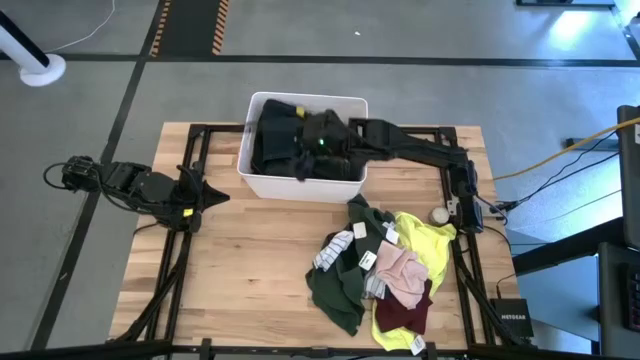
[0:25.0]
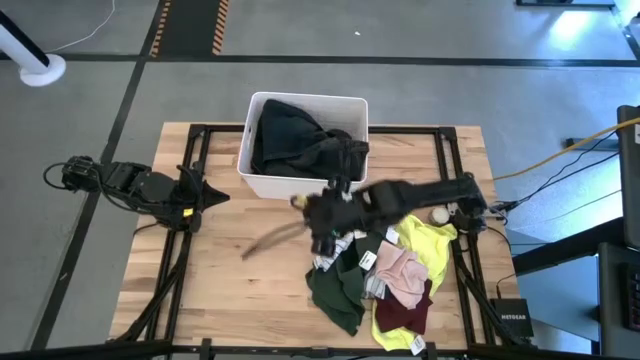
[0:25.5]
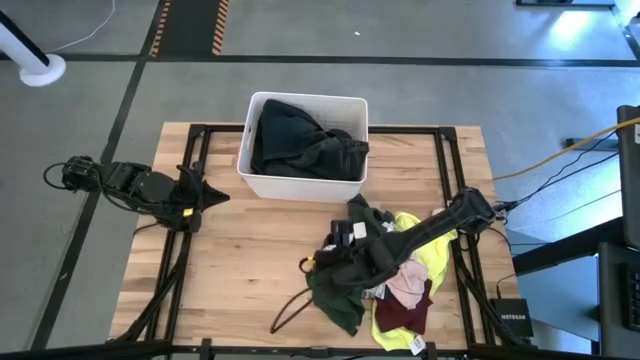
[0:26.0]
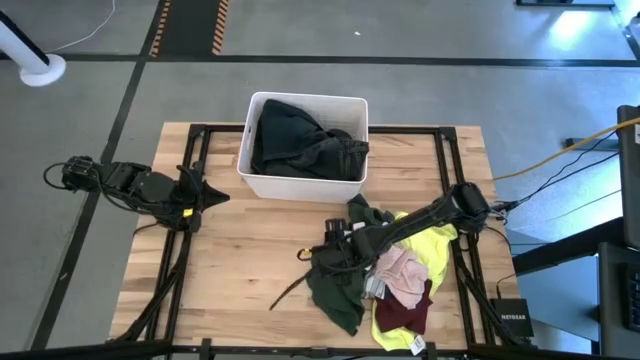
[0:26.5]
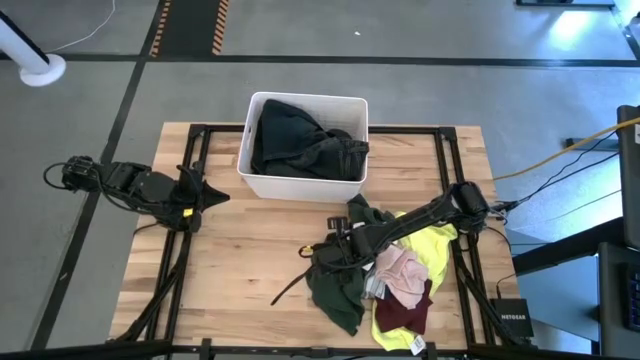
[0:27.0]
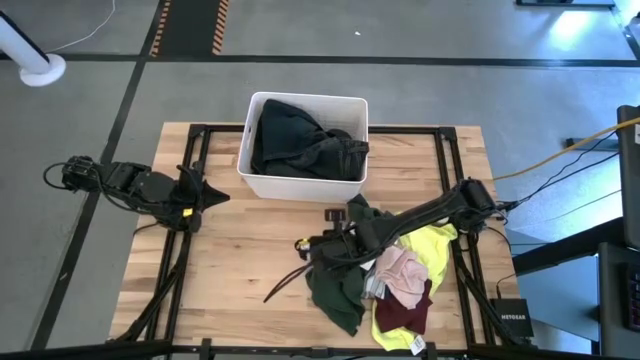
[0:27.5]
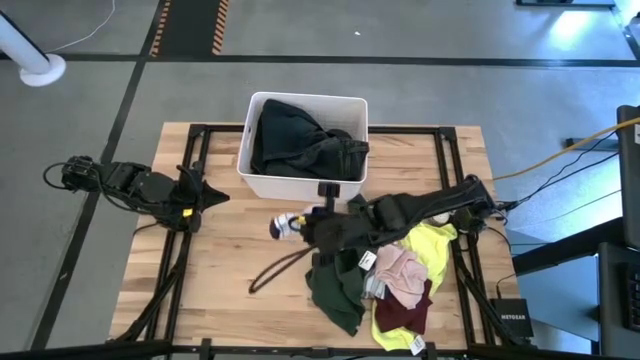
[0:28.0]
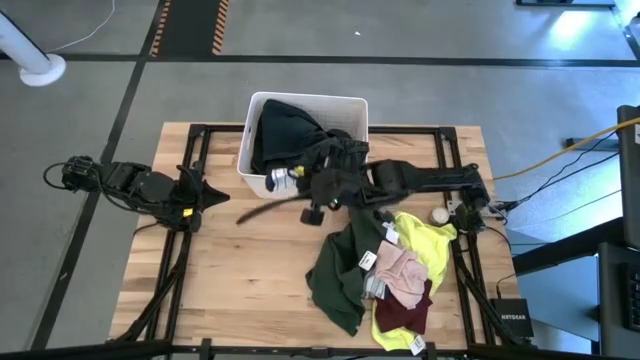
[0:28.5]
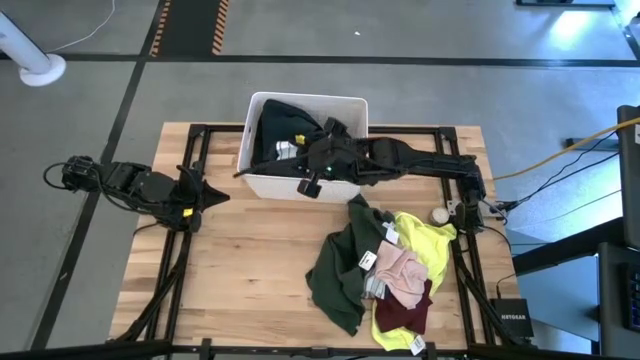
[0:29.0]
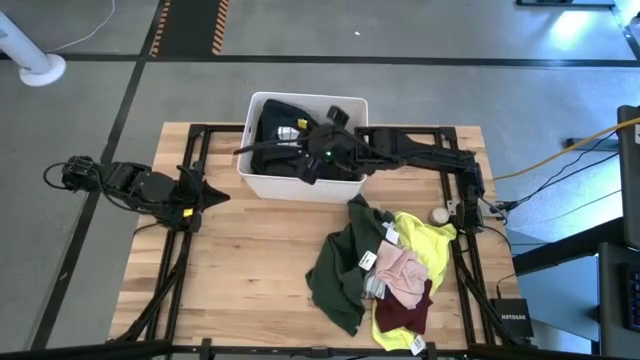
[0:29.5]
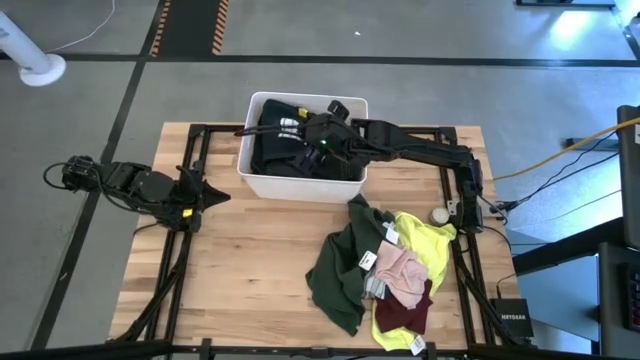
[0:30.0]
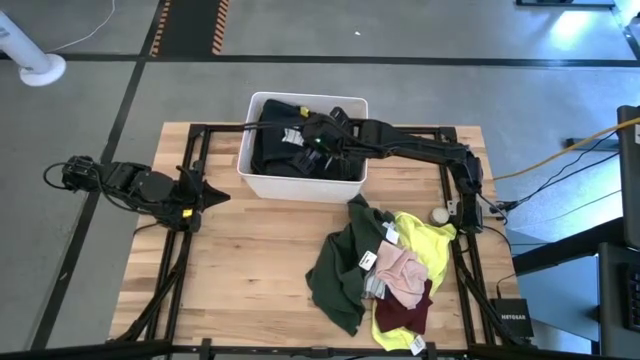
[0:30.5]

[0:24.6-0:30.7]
Task: Sort clothes
Put the top white socks into the white laundry bin

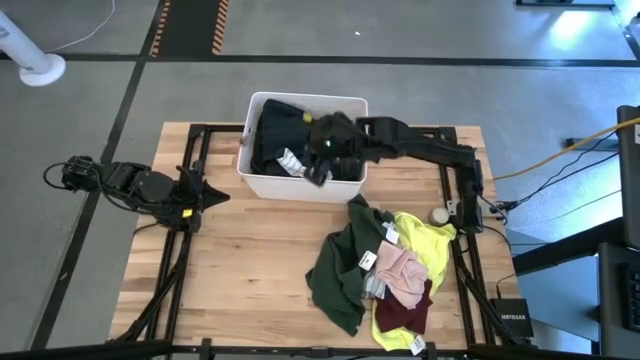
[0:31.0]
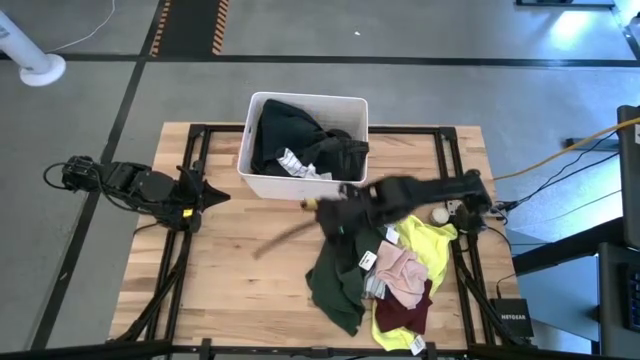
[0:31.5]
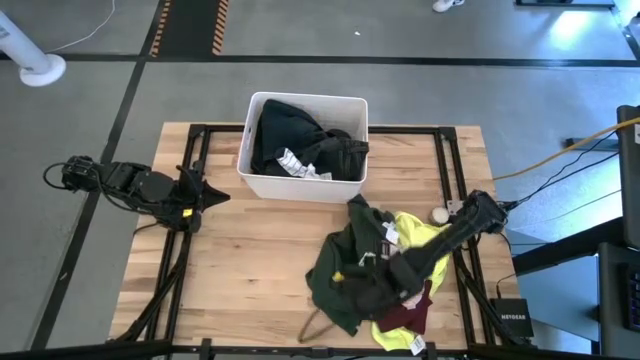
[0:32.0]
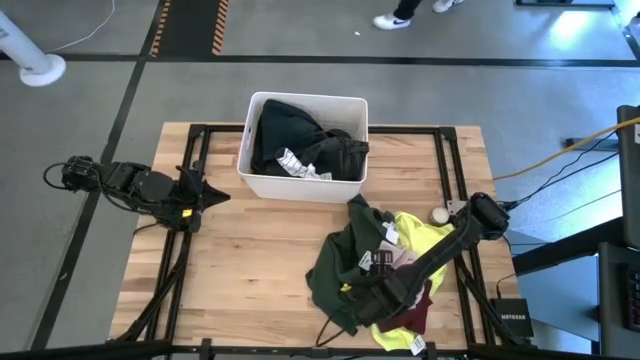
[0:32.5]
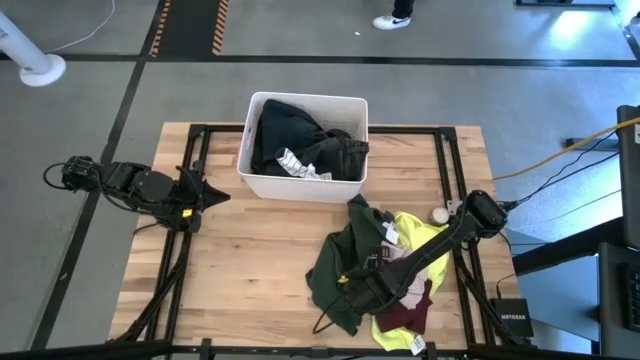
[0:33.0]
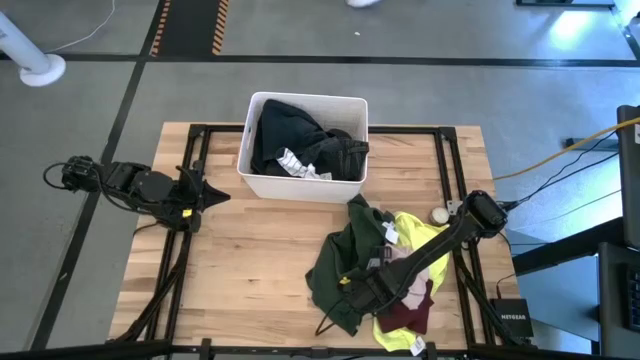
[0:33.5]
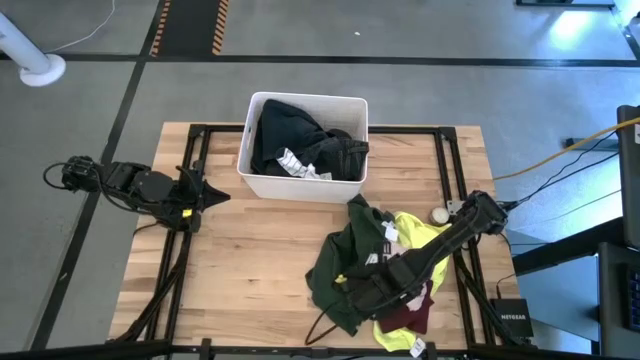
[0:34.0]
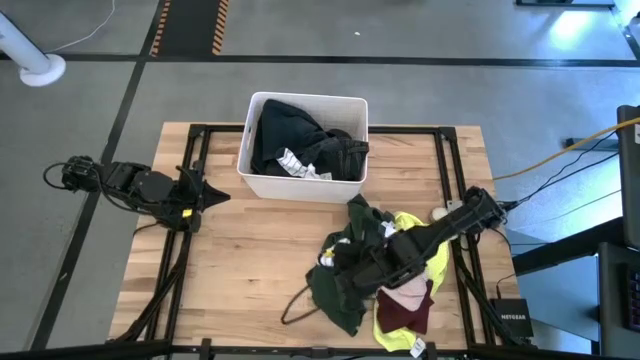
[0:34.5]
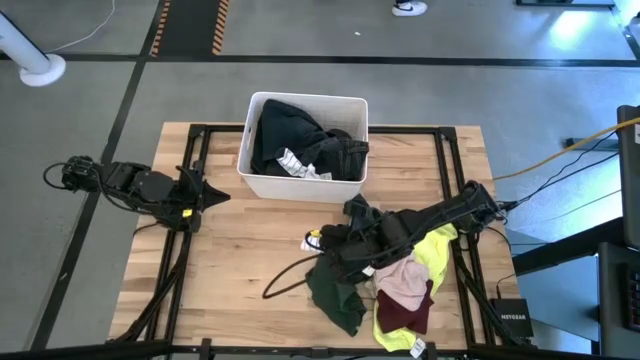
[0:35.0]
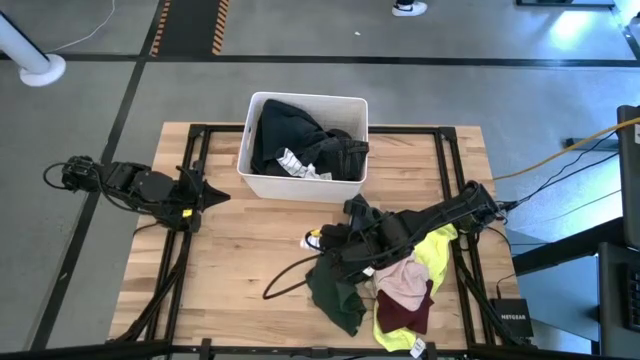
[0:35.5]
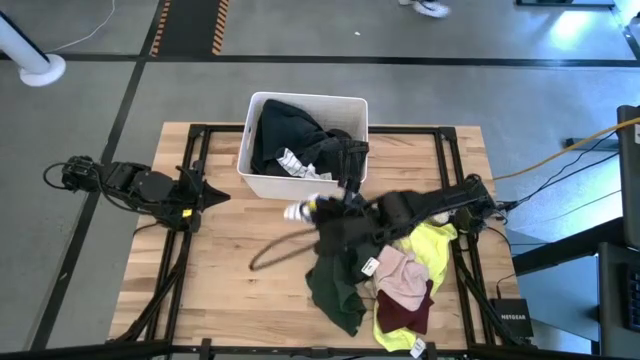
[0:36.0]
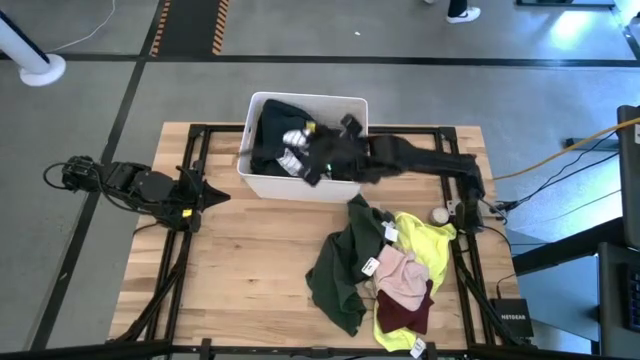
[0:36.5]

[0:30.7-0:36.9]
Put the white socks into the white laundry bin

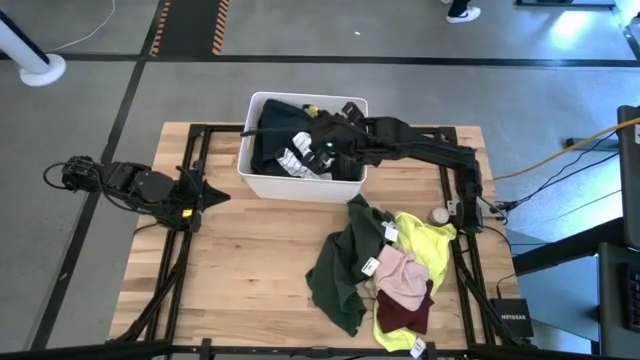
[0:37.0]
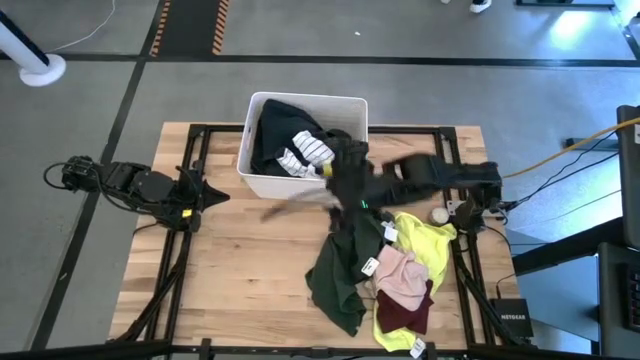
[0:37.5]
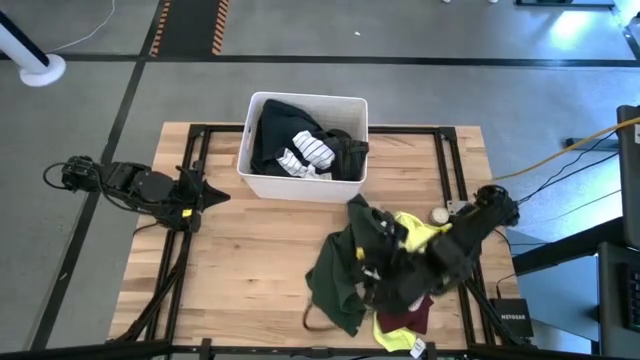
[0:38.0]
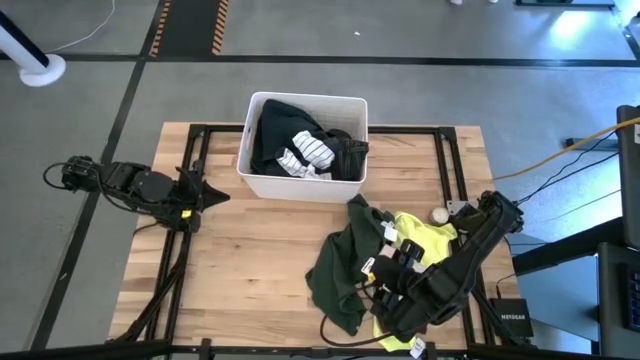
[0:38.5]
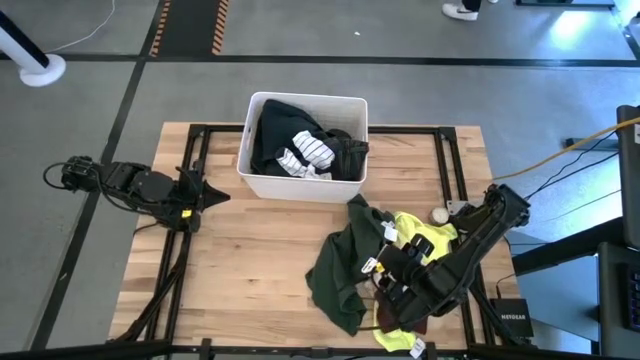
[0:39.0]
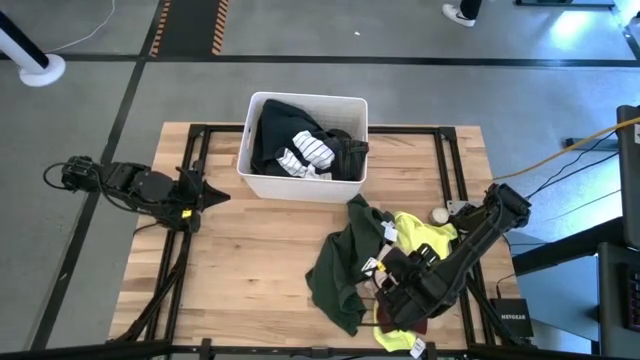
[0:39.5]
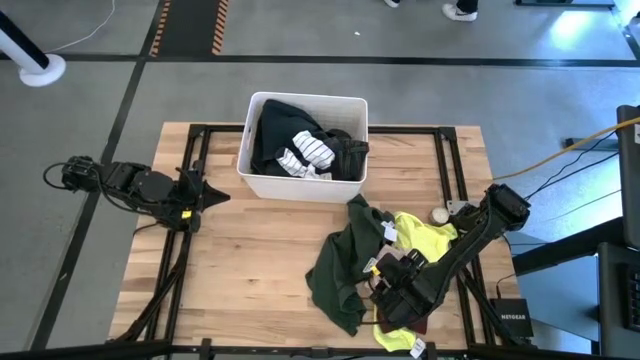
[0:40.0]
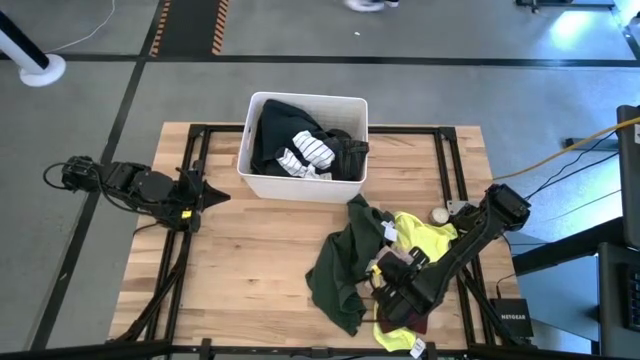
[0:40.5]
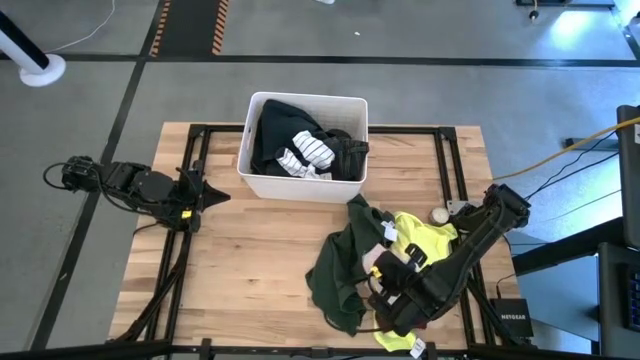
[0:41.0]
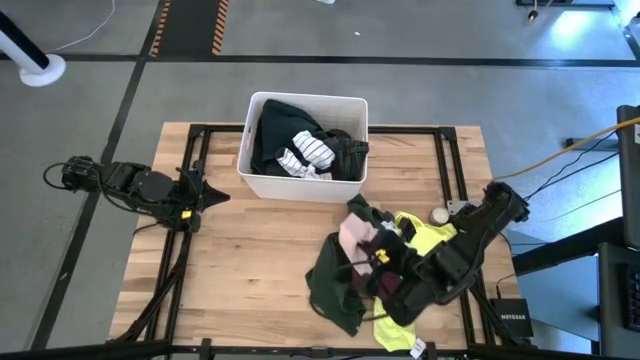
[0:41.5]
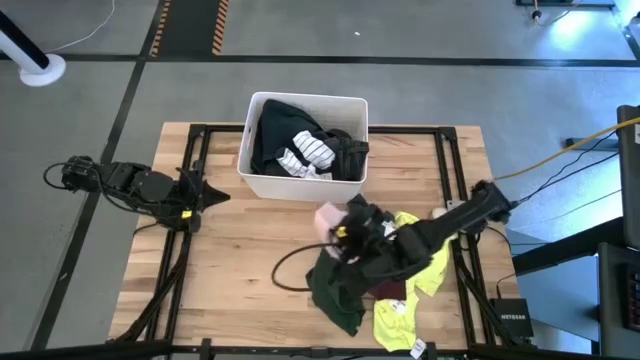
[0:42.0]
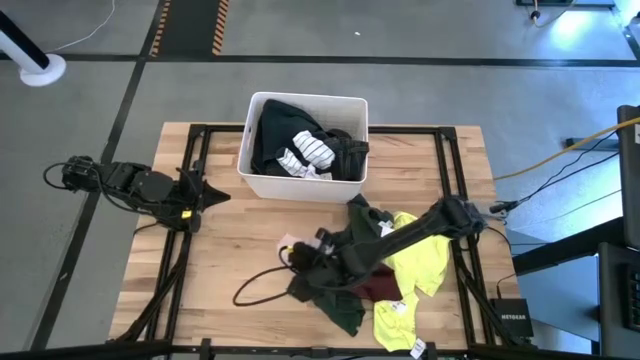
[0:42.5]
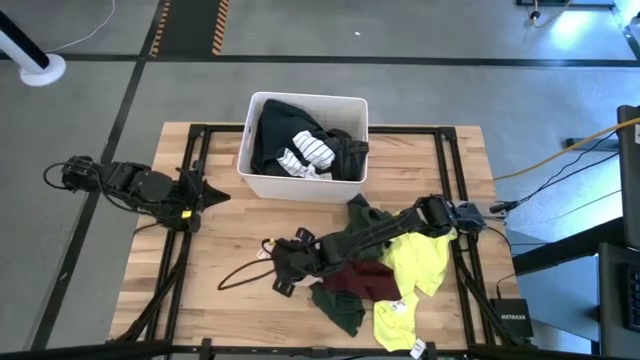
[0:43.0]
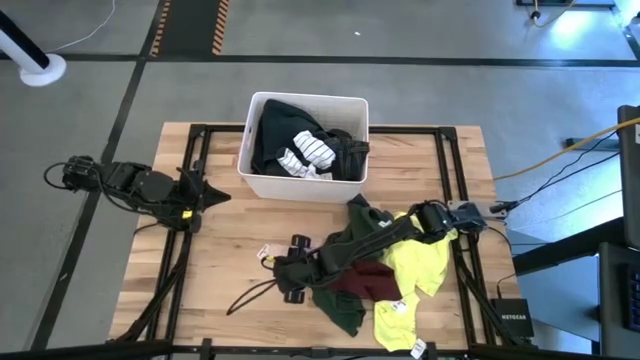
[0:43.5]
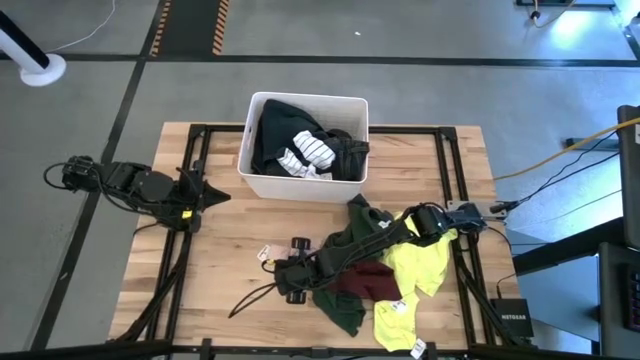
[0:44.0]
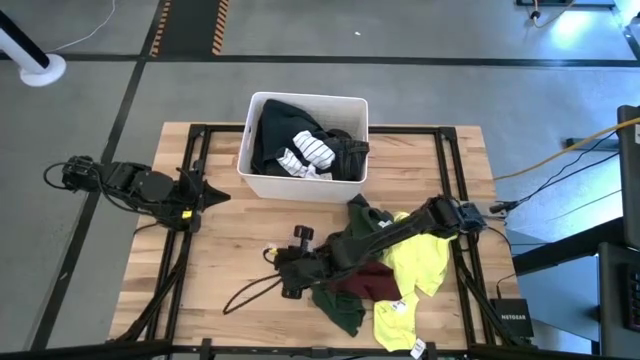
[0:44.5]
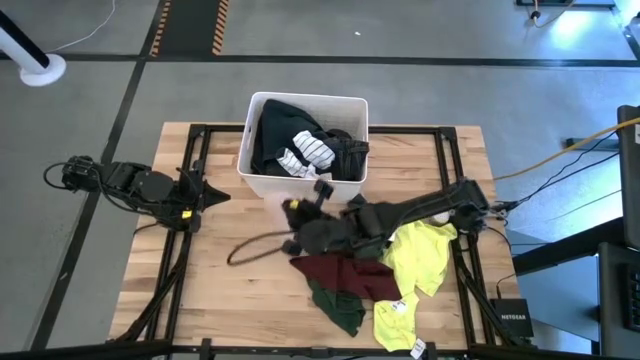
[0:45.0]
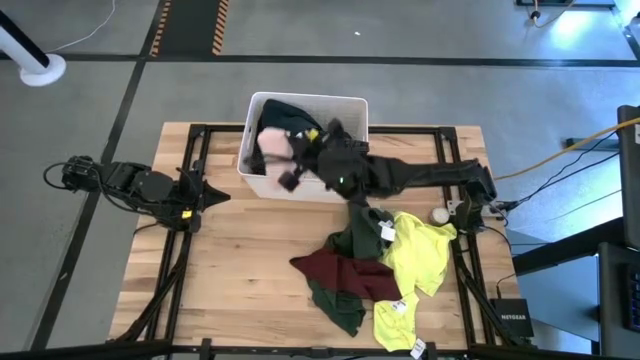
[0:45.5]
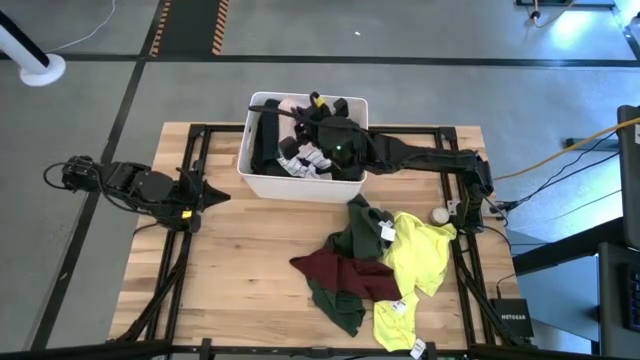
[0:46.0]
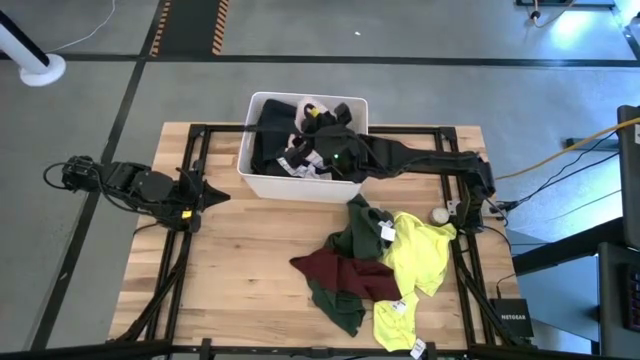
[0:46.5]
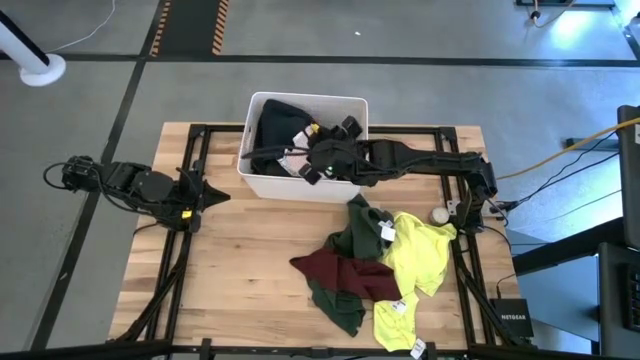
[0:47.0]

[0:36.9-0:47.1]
Put the peach underwear into the white laundry bin
